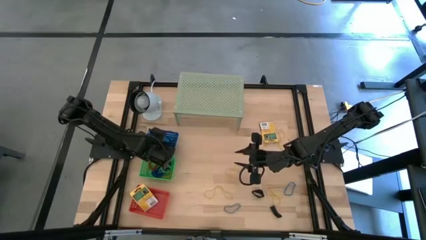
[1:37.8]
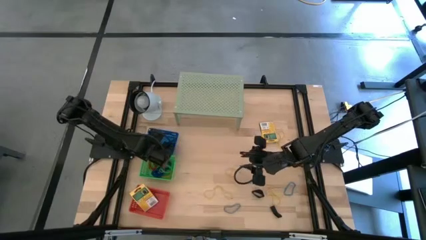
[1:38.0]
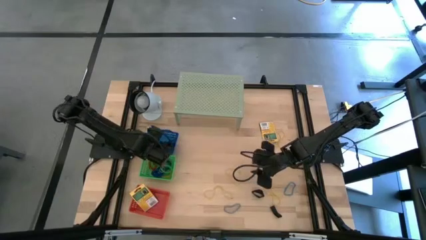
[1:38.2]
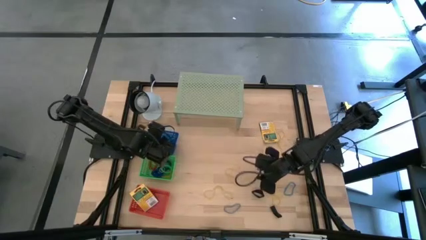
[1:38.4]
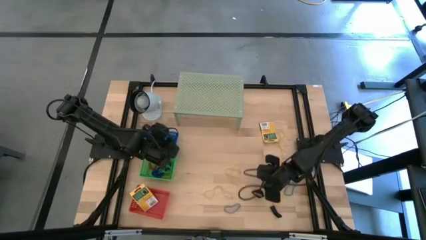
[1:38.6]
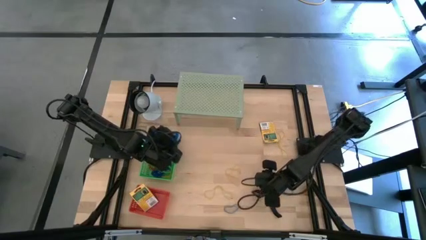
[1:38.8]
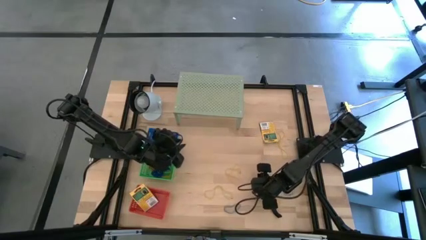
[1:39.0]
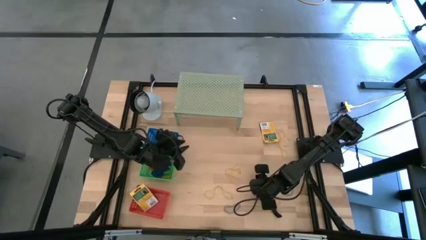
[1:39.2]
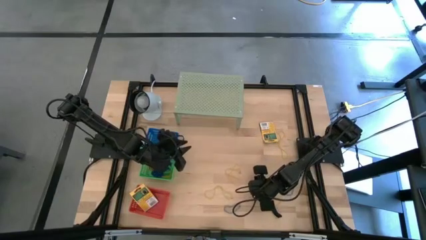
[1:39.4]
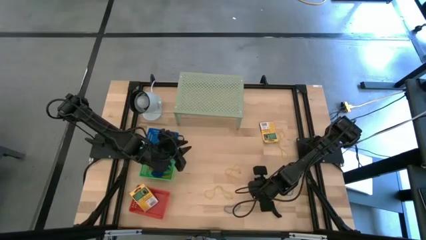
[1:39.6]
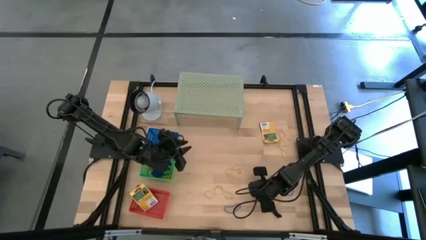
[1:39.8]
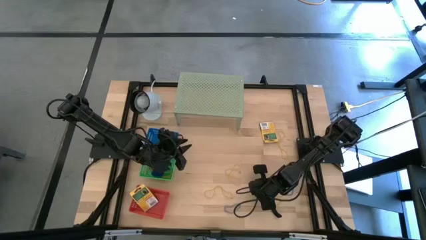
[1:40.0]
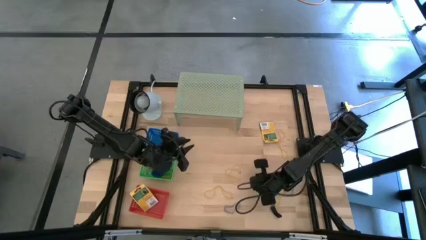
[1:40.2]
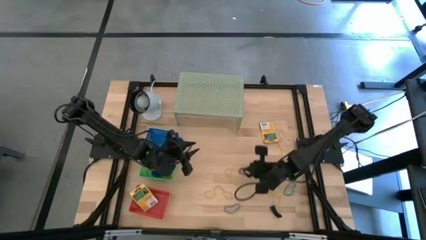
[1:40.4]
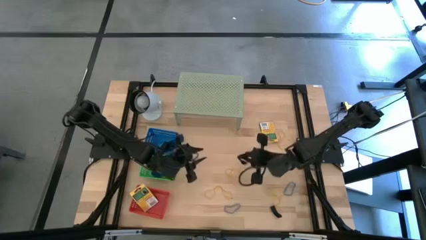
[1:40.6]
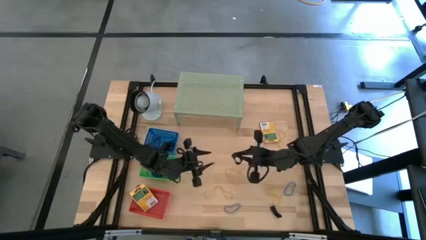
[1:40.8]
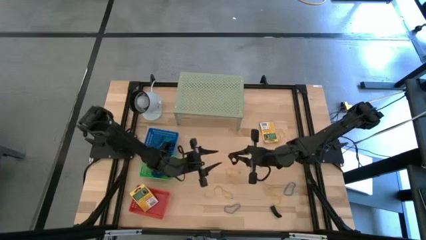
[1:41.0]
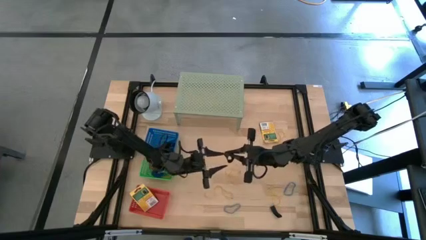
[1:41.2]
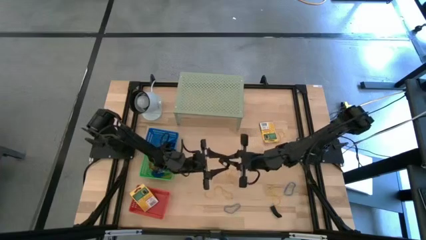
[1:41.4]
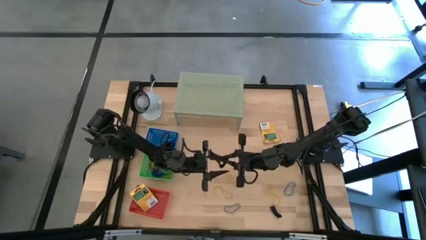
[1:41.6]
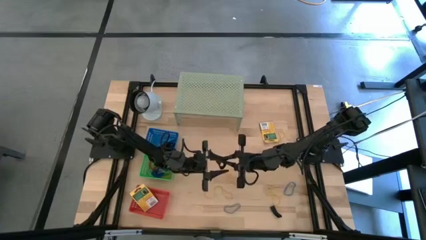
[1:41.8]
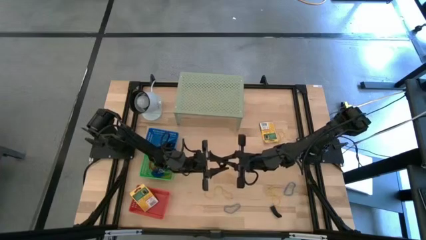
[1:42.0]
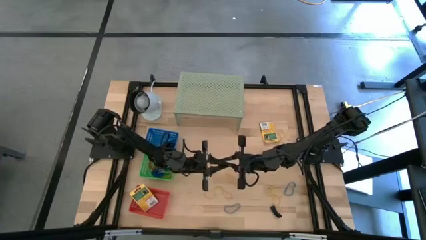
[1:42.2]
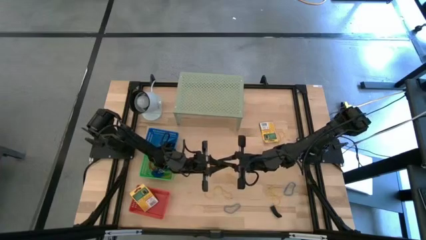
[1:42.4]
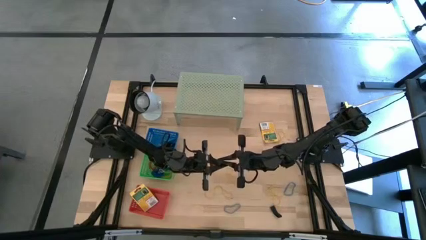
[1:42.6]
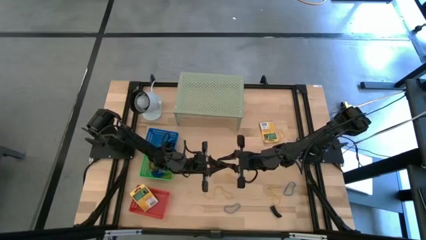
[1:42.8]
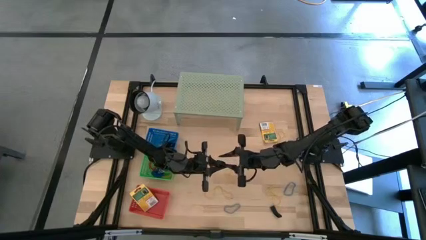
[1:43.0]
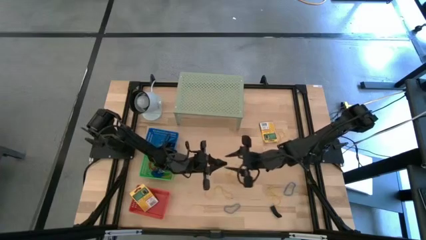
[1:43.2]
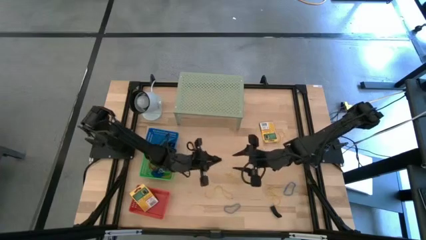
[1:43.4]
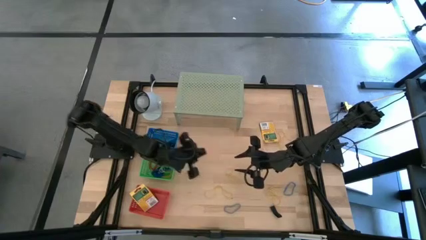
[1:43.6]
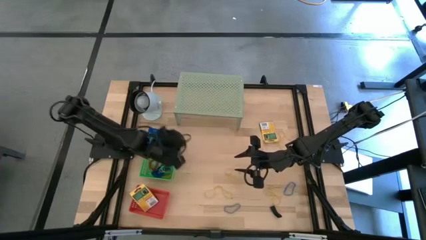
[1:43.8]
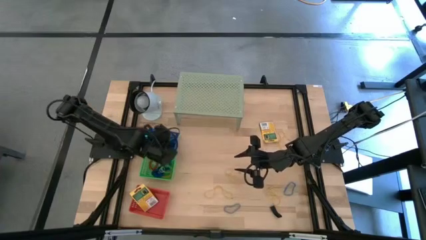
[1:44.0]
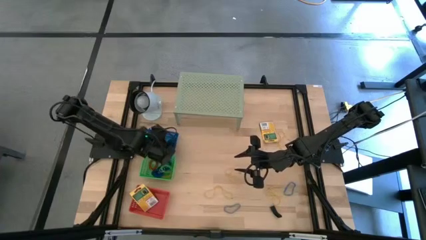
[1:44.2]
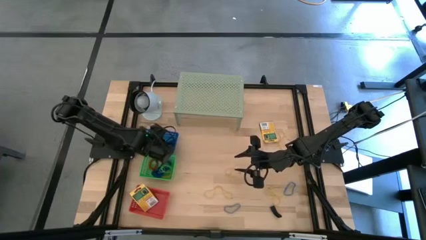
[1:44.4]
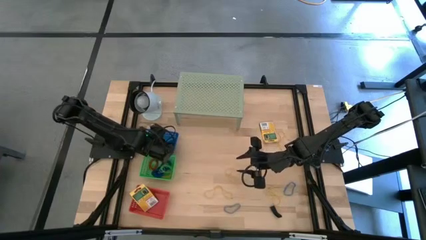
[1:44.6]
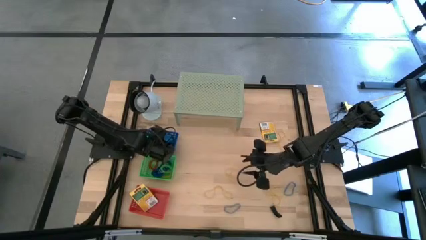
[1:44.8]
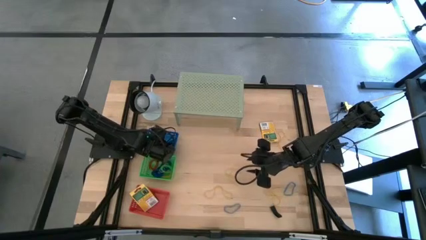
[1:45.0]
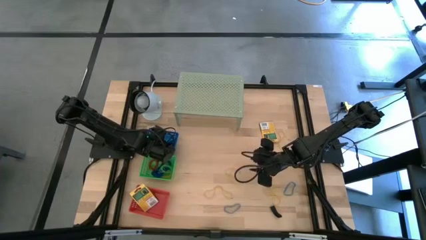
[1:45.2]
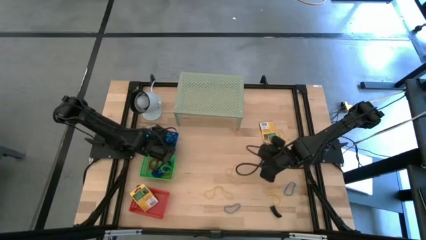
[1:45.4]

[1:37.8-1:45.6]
Task: Pick & Place Office Desk Supplies
Put the black rubber band into the blue bin

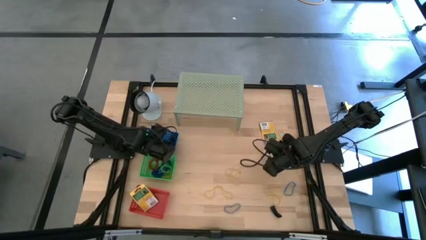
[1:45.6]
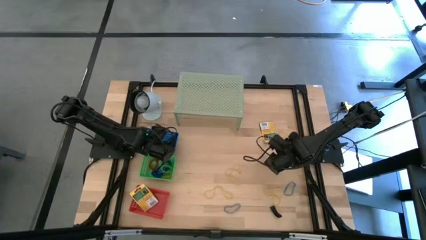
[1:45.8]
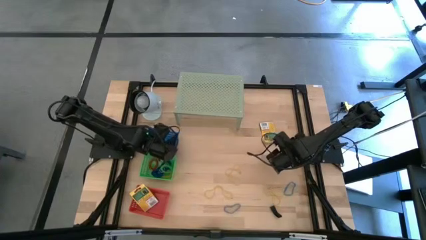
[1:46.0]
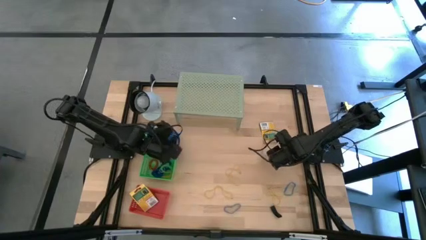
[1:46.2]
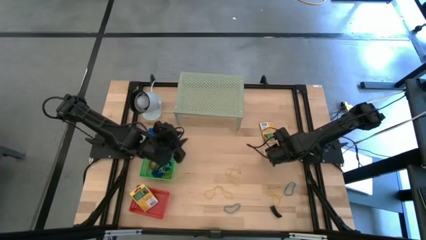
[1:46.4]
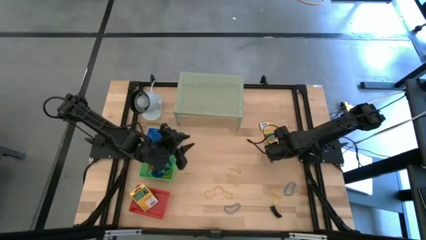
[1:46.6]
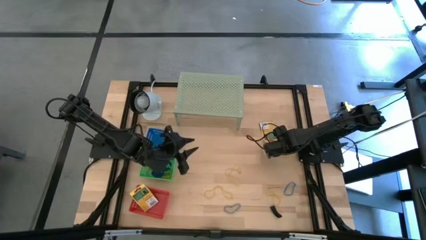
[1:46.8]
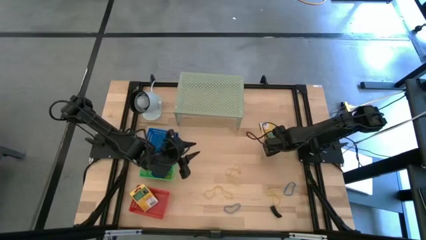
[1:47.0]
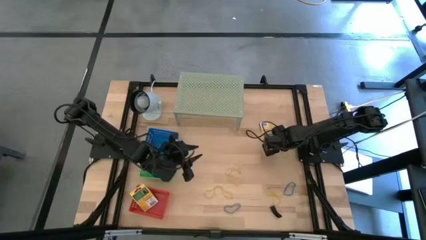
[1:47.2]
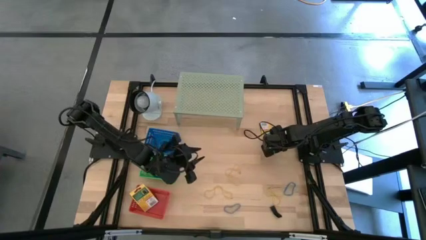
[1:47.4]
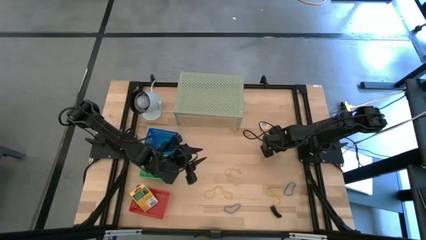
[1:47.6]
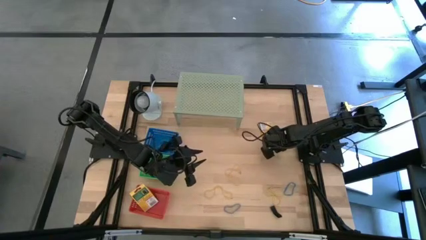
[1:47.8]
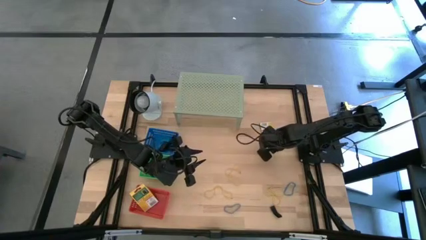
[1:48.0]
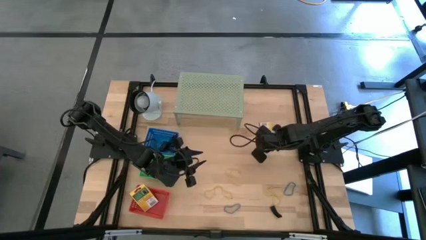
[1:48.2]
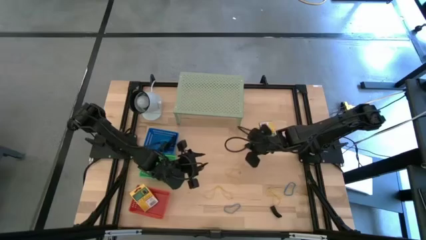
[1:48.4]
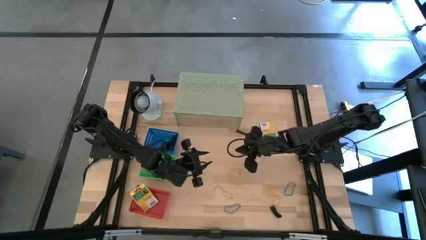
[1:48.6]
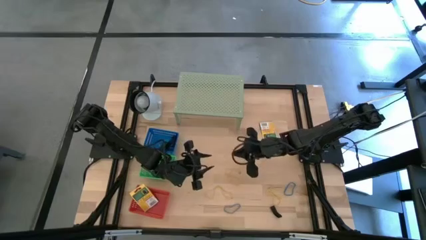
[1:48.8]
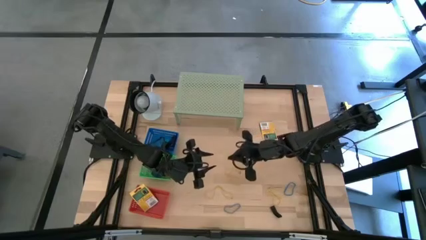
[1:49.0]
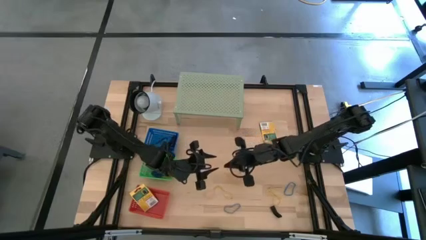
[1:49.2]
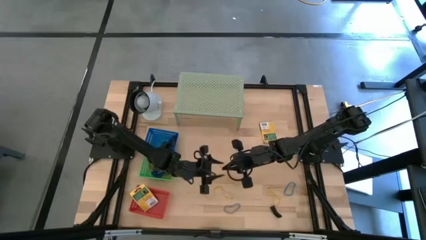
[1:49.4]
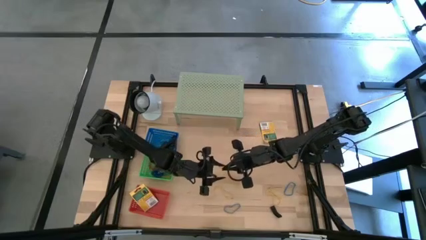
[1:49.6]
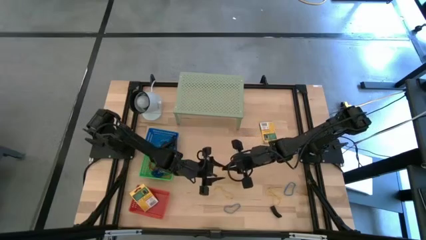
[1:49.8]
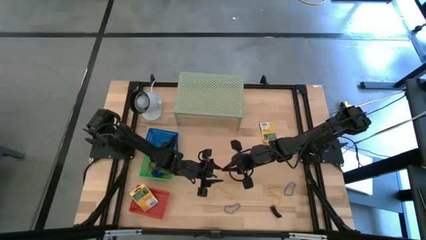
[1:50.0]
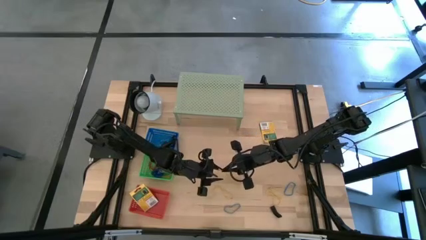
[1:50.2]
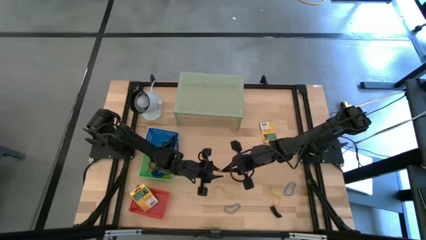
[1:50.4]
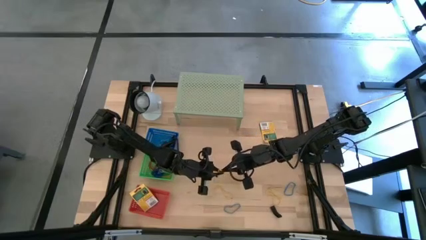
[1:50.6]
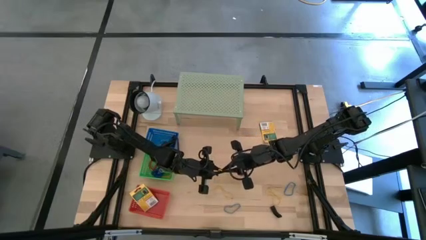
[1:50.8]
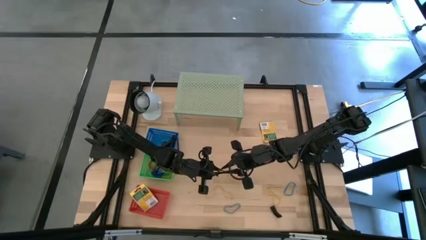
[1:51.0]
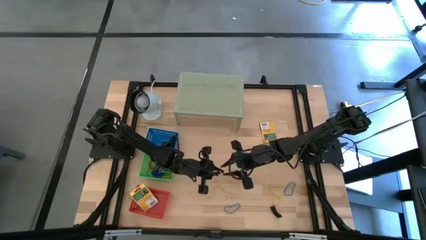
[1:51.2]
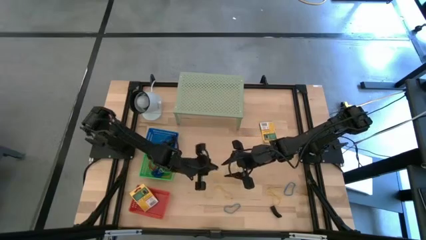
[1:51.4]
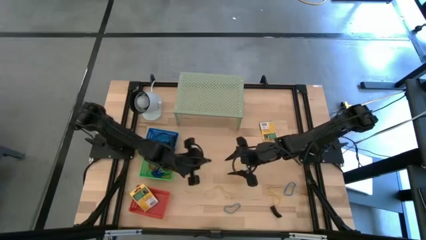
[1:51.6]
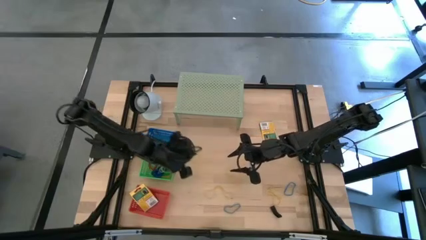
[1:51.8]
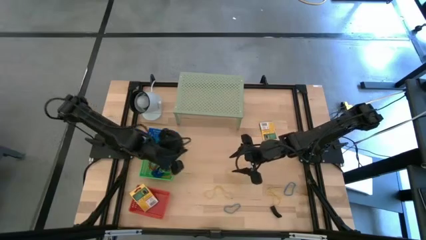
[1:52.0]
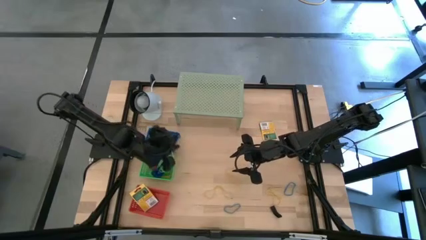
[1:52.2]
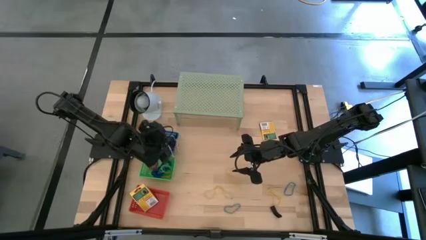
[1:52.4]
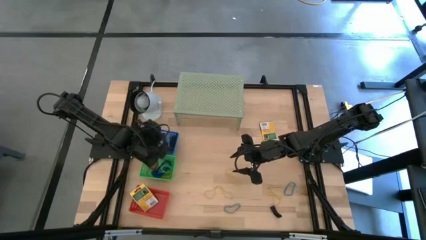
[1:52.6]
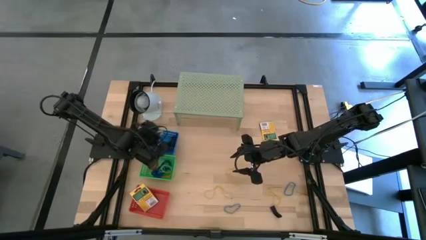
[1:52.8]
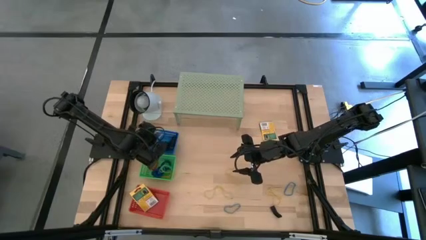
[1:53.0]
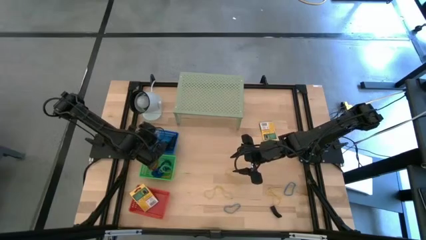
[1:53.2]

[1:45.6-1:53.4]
Put the yellow rubber band into the blue bin

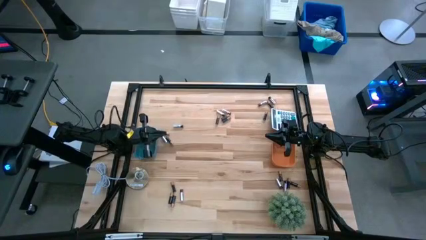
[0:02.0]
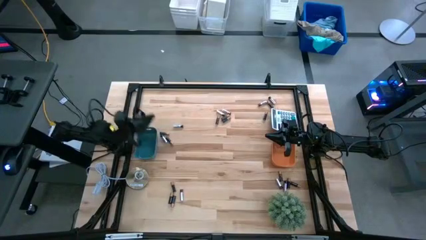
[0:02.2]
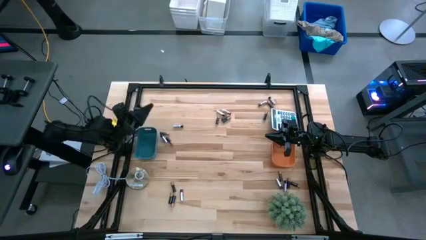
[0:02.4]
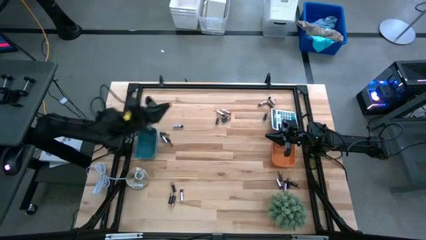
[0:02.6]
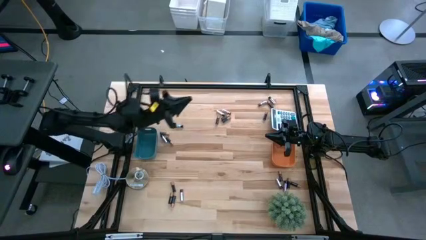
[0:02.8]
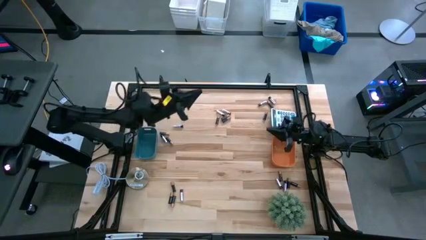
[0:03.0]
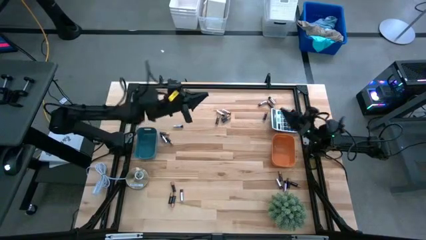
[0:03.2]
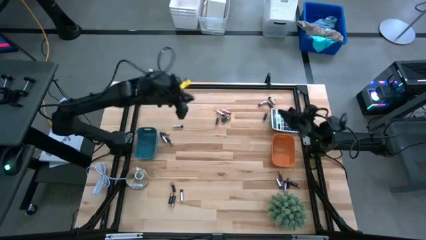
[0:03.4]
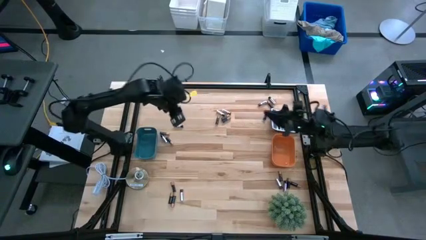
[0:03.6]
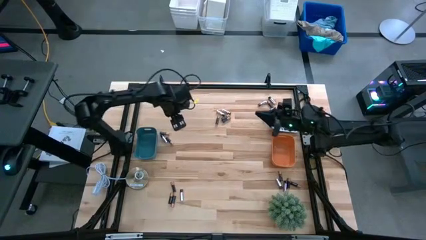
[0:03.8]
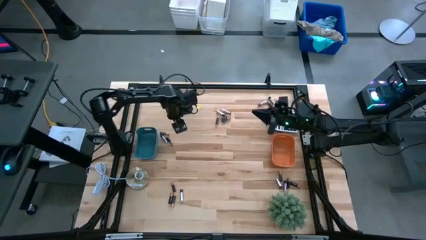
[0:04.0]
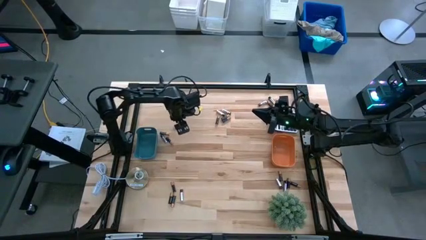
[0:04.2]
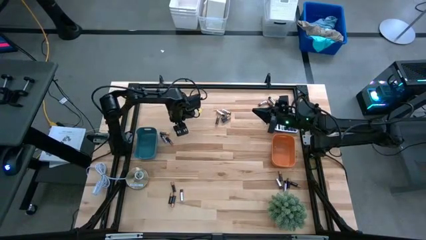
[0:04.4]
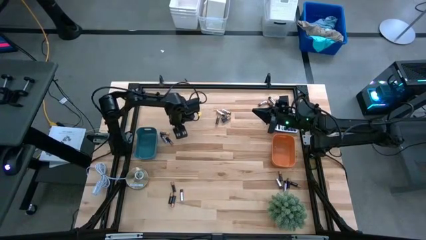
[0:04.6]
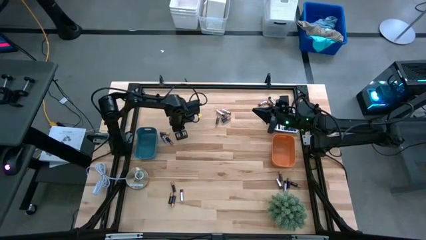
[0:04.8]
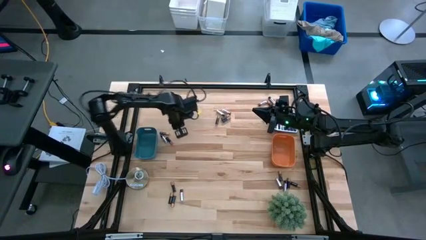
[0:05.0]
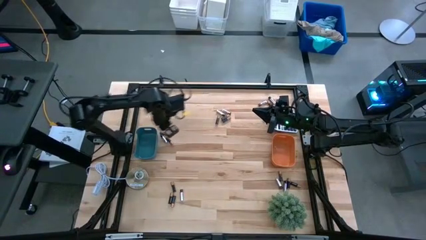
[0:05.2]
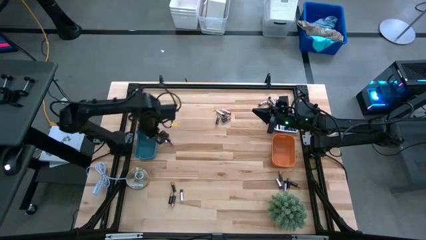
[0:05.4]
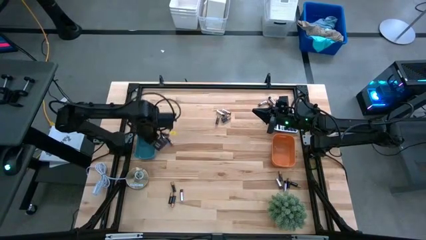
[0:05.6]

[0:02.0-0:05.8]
Task: Sort batteries
Put the silver battery into the blue bin
